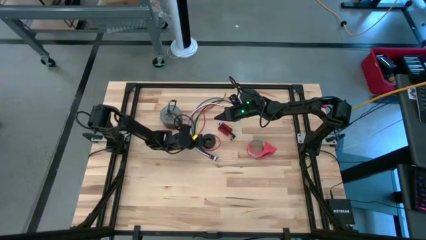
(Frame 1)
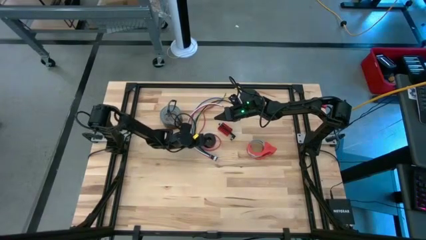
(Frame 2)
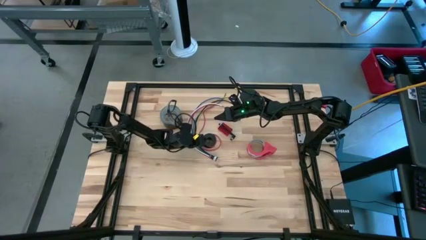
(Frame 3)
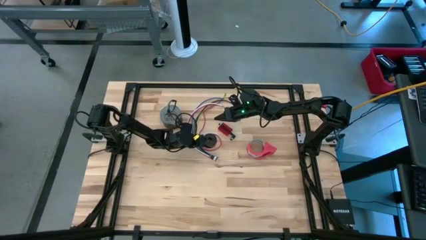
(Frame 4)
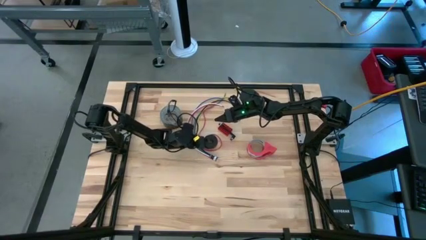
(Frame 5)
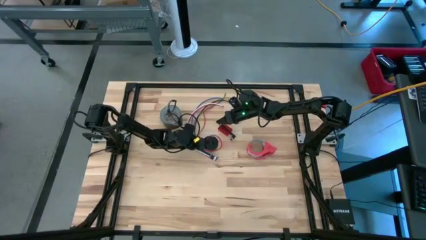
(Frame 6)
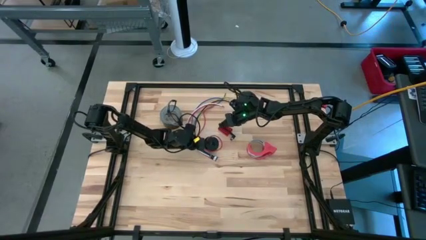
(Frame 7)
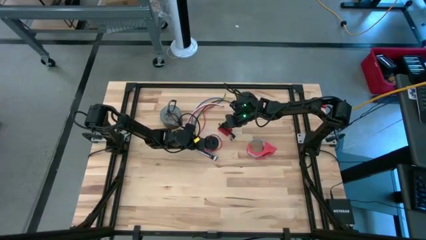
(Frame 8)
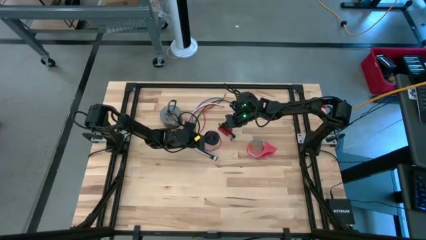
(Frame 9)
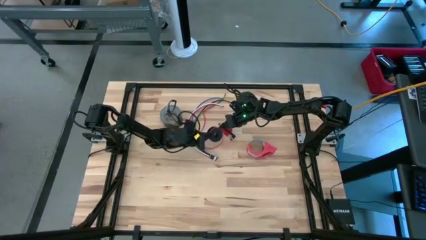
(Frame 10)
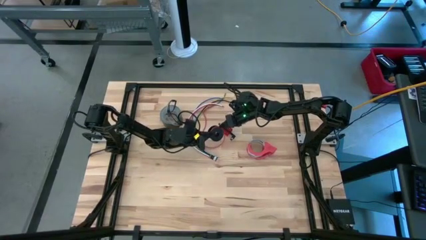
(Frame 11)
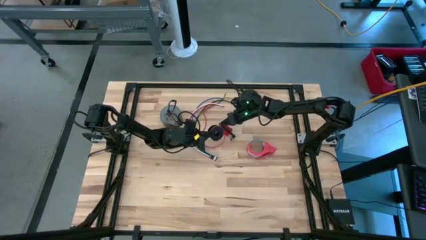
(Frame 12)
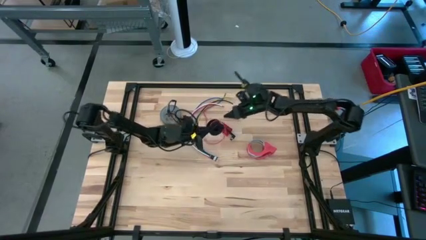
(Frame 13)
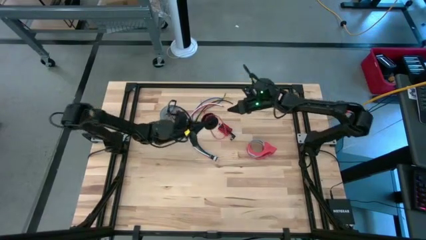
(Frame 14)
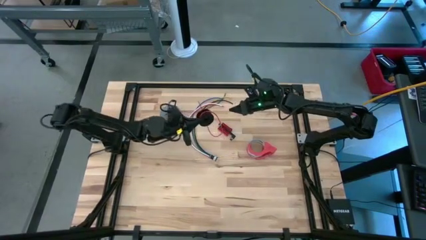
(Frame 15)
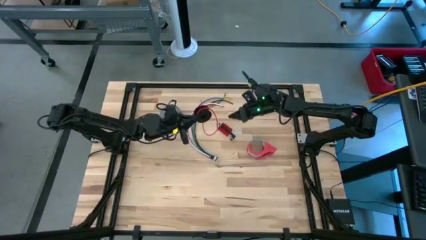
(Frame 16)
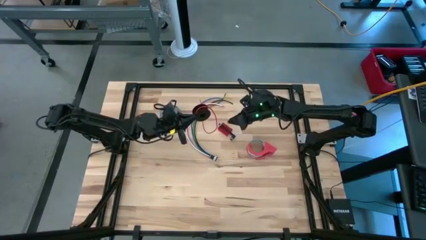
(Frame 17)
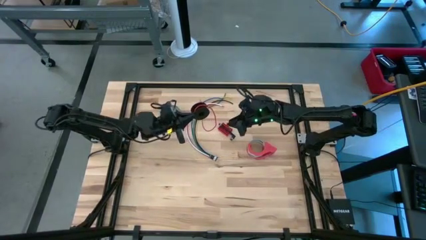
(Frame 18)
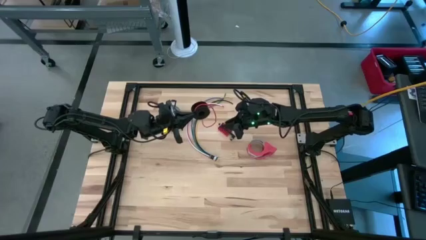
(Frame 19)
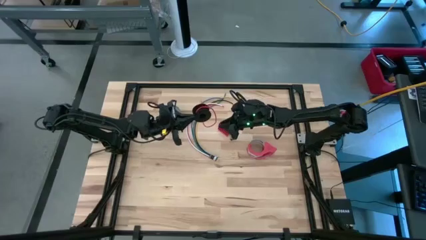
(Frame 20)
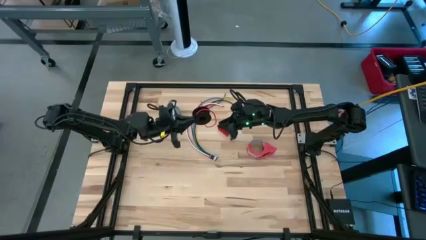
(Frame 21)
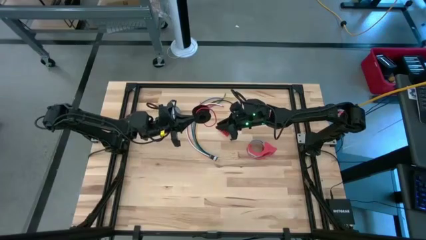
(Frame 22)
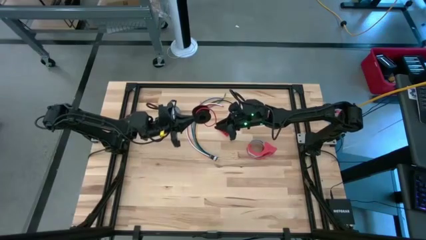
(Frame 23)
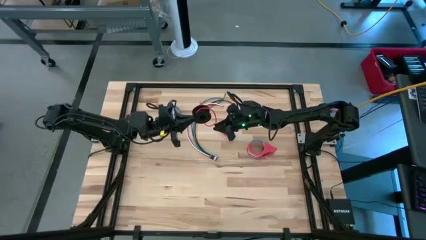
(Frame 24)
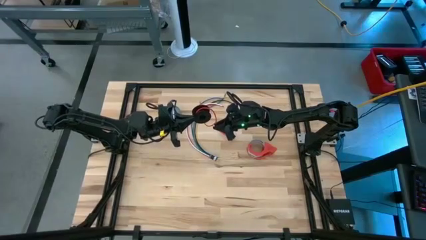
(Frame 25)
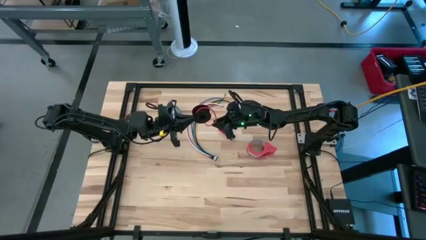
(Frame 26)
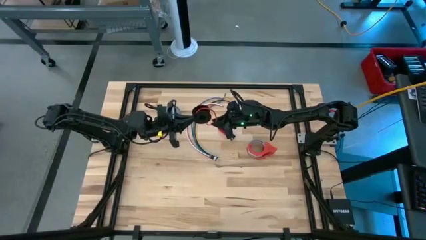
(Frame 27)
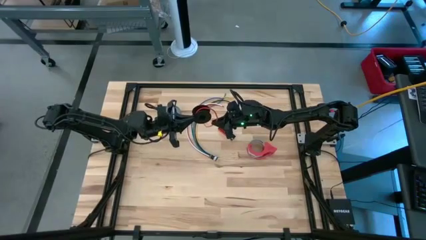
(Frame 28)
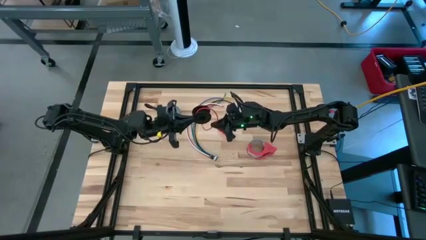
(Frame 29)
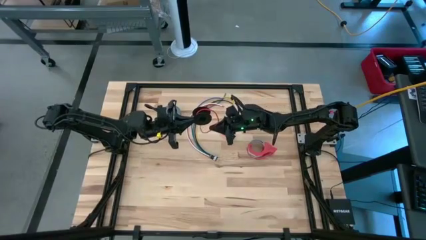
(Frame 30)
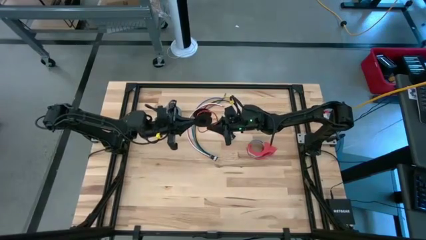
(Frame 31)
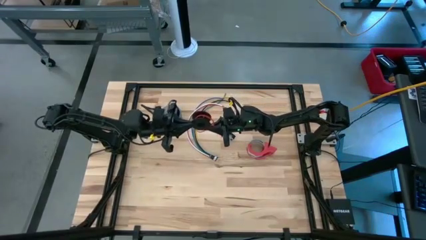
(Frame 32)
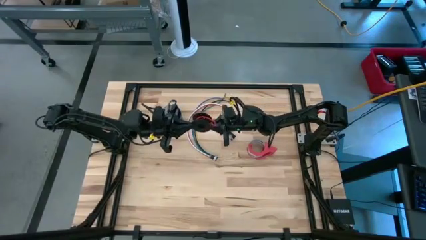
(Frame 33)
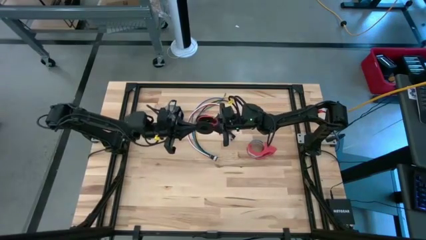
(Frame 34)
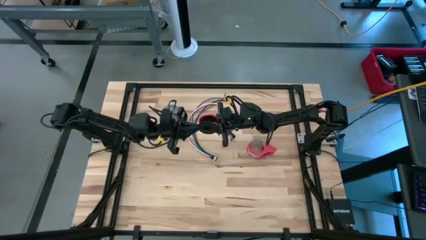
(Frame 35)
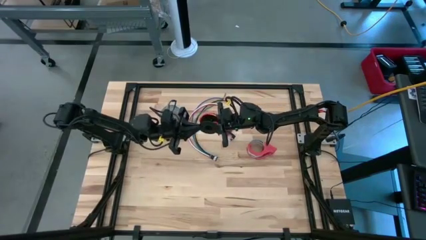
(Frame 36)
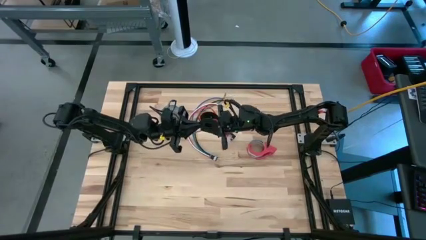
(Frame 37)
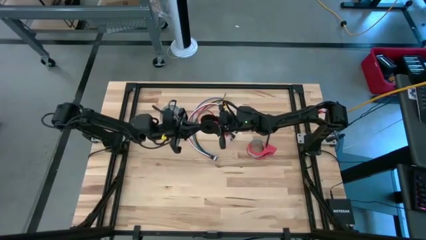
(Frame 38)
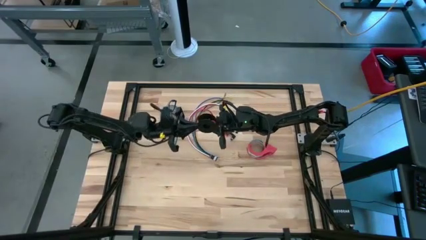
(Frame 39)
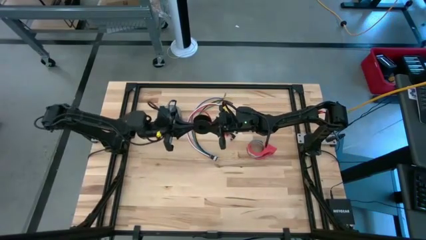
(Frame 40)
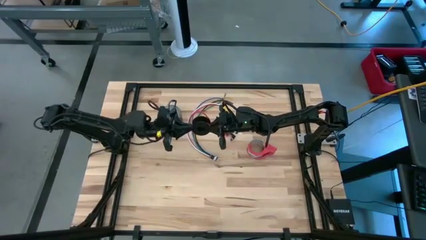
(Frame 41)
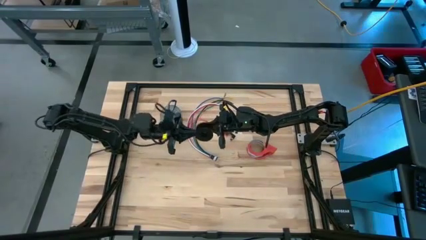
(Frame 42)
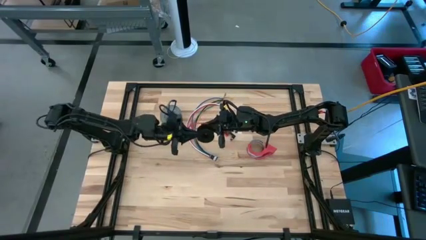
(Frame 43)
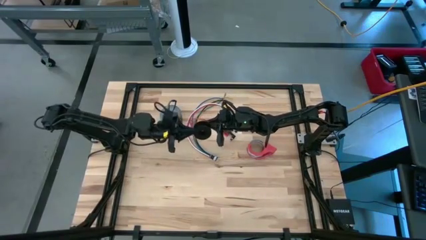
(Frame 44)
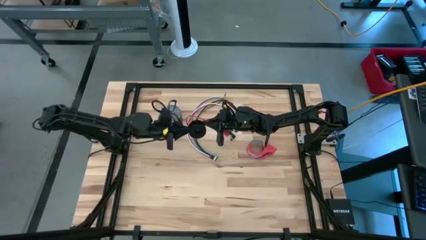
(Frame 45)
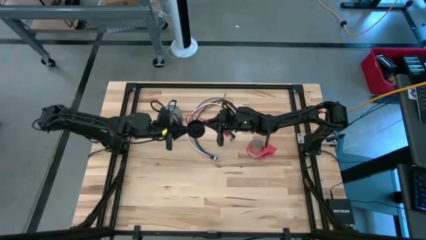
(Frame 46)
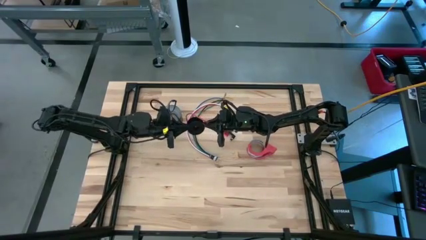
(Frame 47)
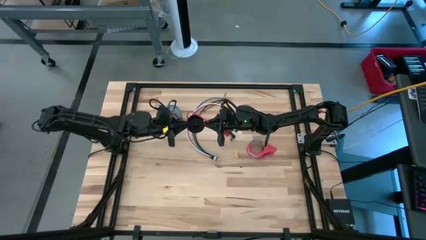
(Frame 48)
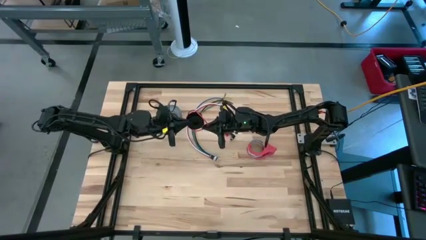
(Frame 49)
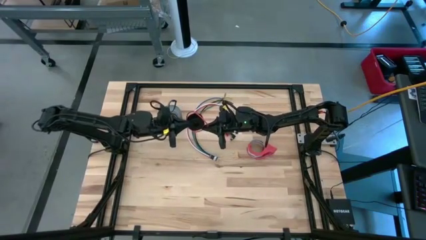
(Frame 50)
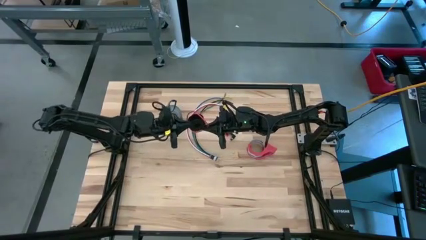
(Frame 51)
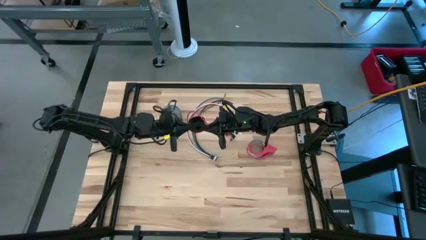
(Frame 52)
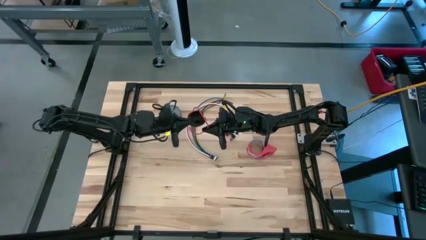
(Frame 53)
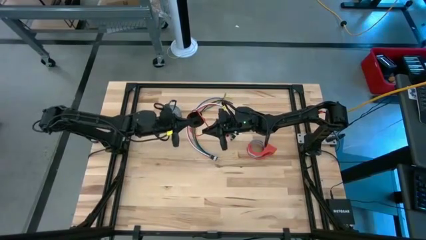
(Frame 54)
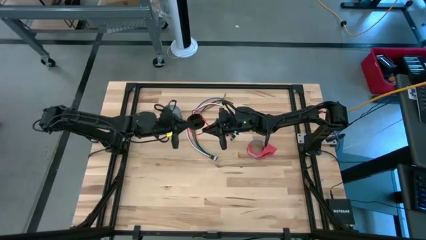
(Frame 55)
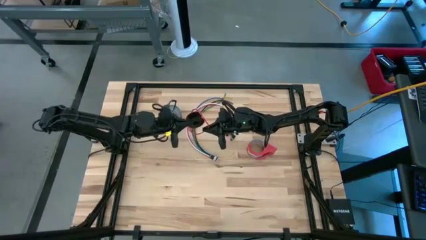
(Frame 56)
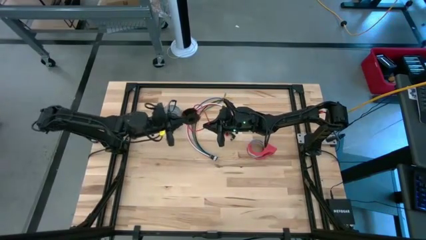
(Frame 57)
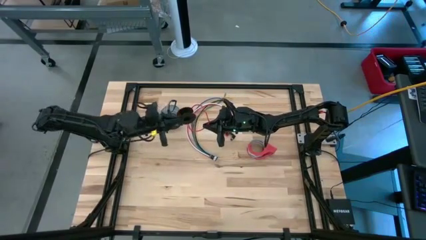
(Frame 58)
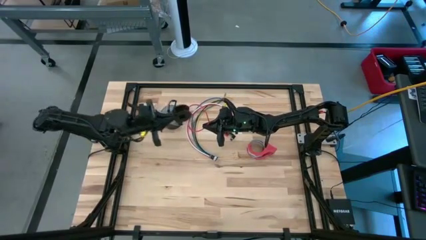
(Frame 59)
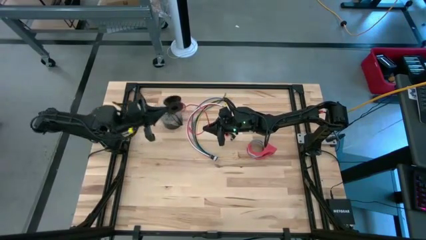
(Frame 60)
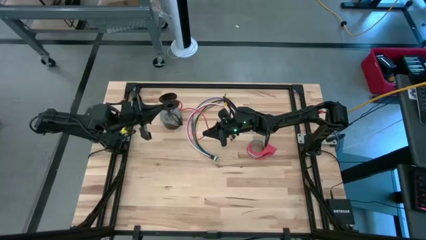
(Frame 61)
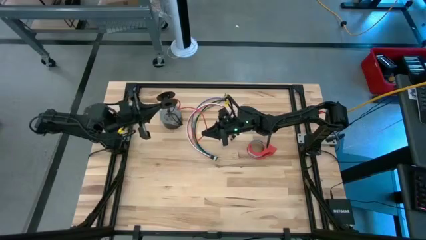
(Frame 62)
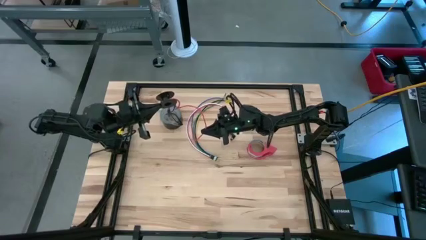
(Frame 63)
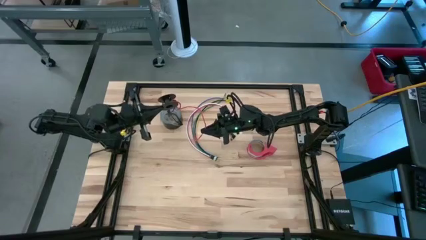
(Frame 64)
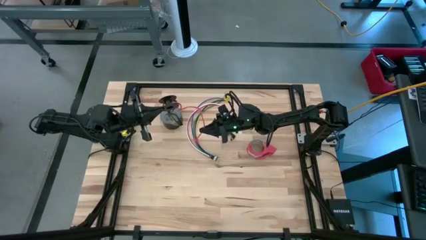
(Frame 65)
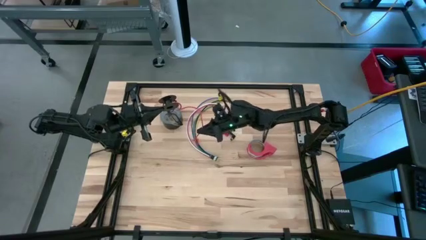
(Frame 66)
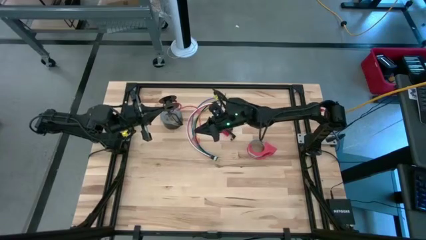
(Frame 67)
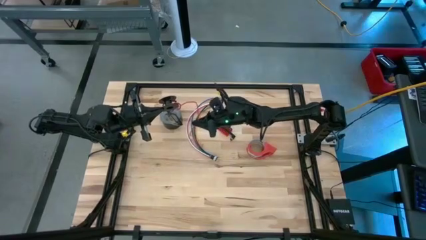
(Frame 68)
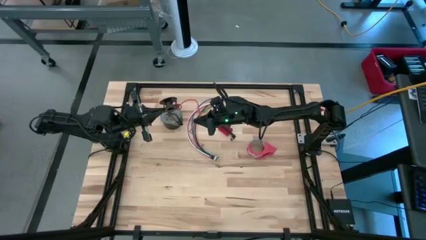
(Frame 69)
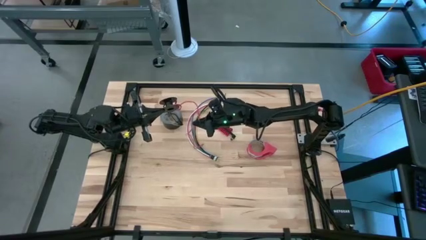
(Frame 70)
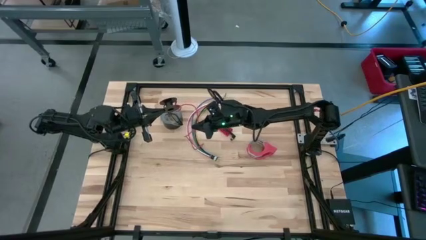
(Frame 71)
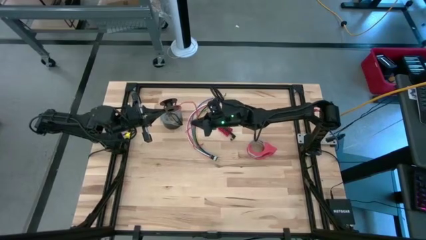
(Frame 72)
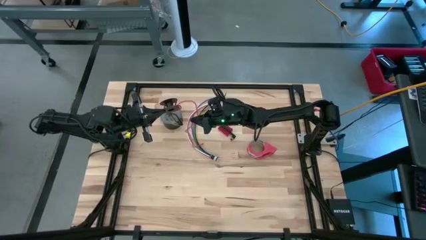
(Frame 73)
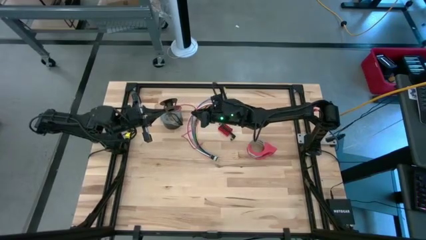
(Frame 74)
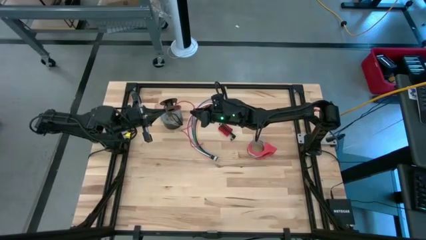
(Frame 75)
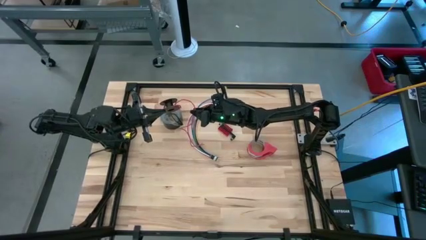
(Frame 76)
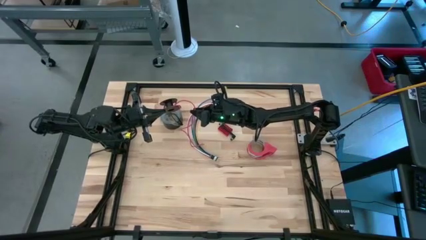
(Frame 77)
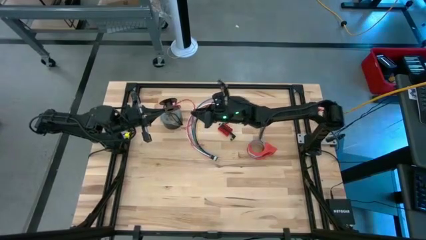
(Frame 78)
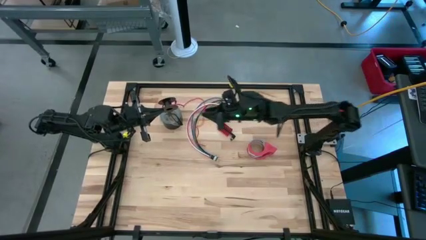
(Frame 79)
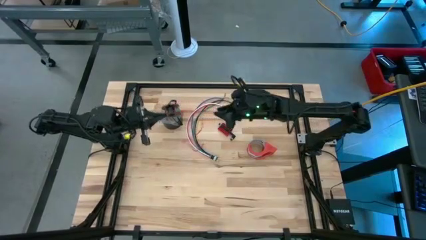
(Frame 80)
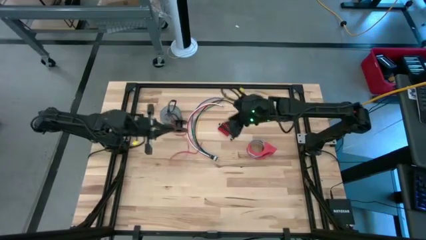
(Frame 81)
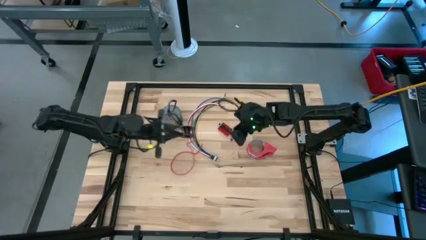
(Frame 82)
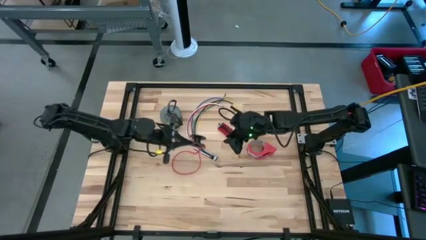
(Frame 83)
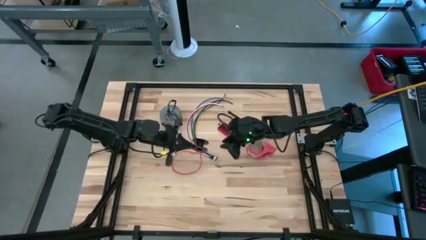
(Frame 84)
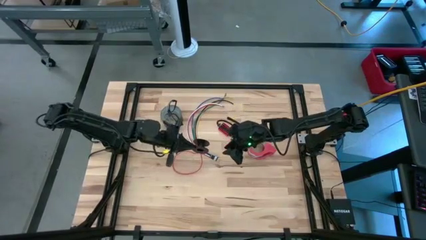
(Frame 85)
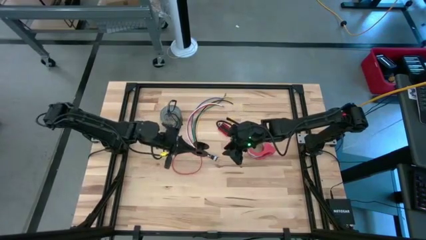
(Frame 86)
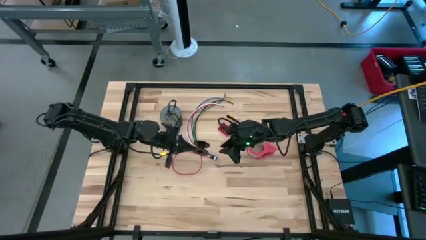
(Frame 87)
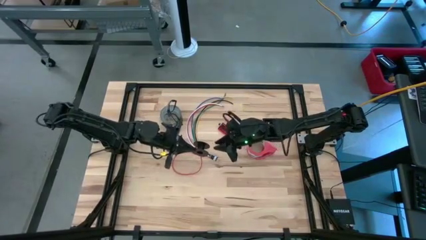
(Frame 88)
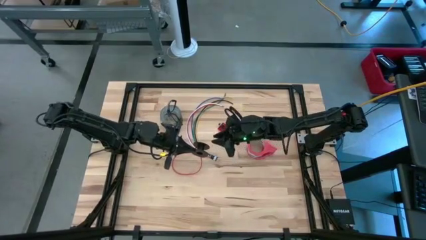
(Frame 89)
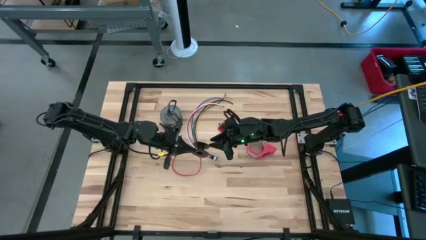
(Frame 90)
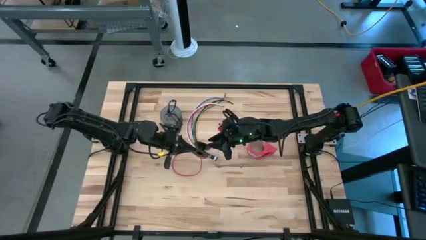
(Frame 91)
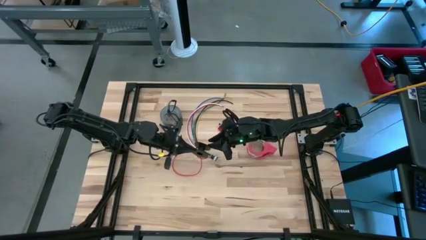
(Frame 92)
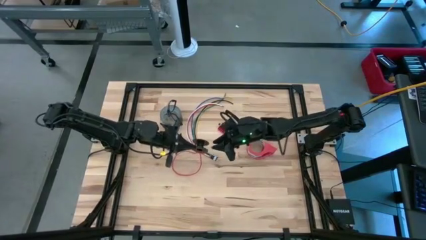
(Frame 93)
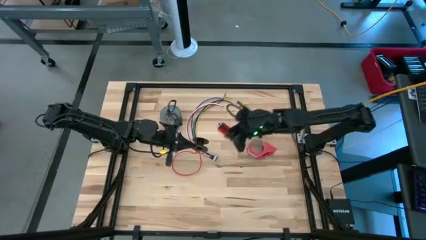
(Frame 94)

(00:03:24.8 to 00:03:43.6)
Task: Coil cords
Coil the red wire onto the spool
